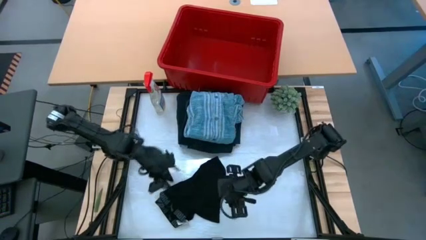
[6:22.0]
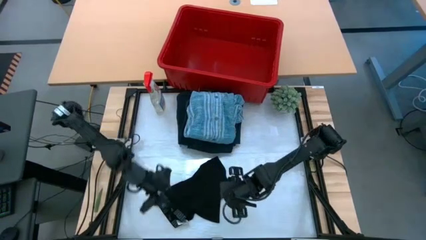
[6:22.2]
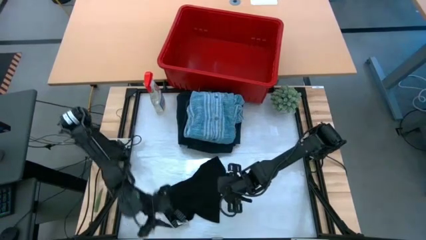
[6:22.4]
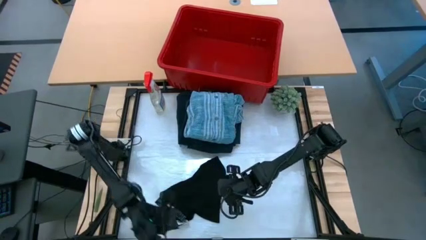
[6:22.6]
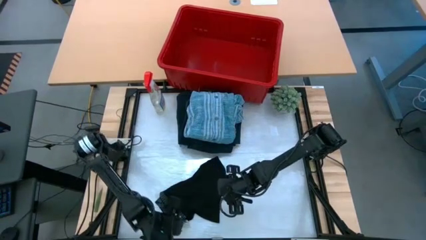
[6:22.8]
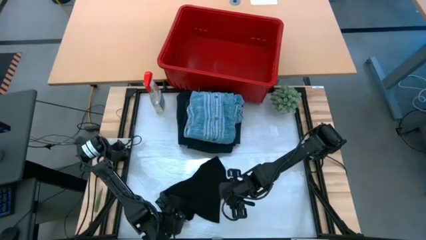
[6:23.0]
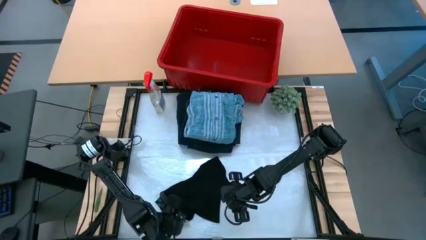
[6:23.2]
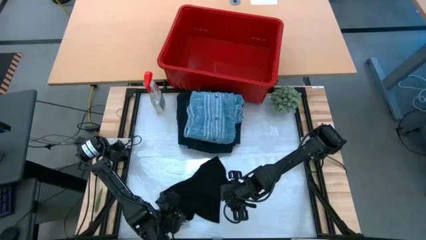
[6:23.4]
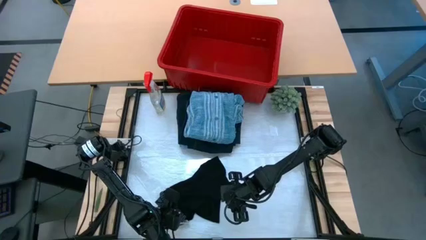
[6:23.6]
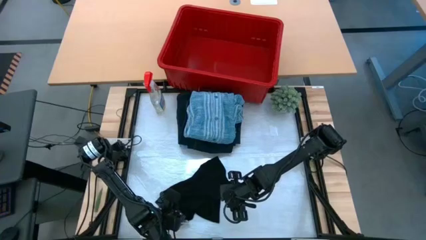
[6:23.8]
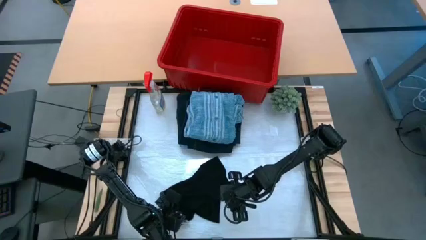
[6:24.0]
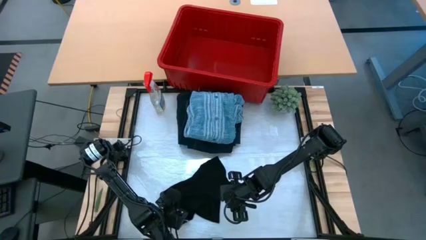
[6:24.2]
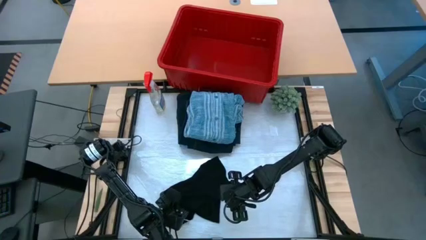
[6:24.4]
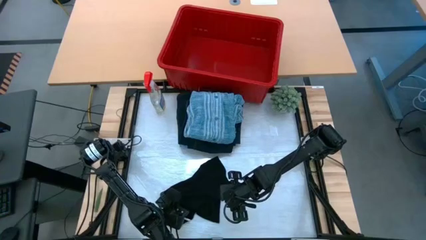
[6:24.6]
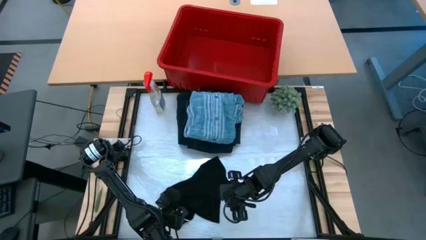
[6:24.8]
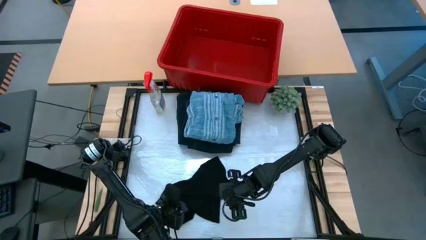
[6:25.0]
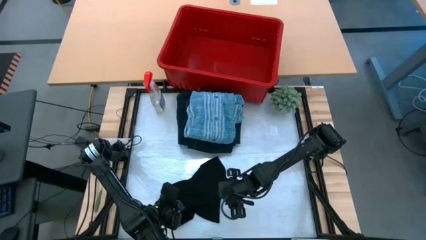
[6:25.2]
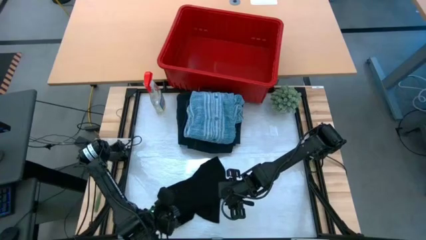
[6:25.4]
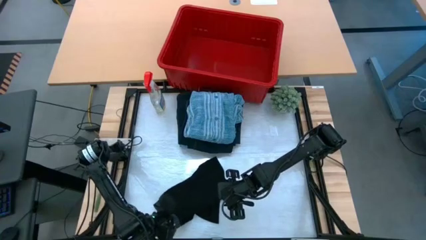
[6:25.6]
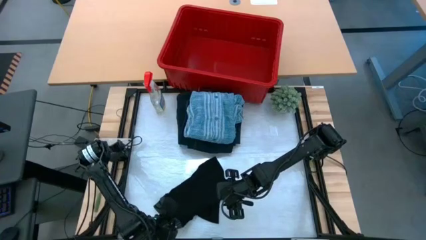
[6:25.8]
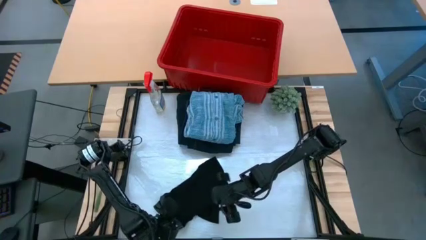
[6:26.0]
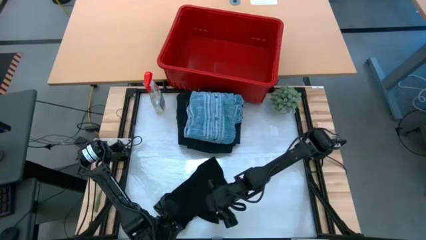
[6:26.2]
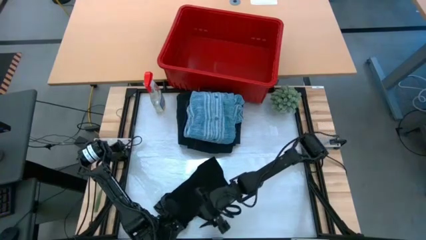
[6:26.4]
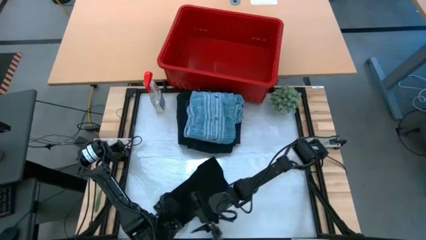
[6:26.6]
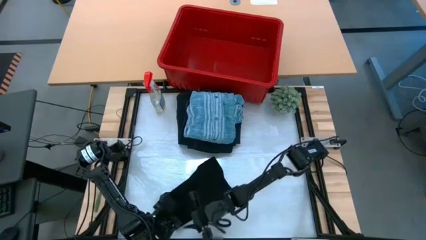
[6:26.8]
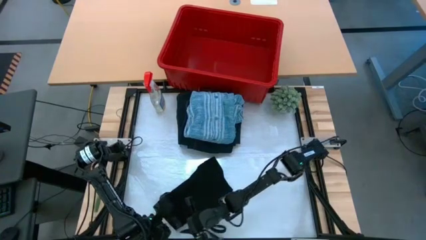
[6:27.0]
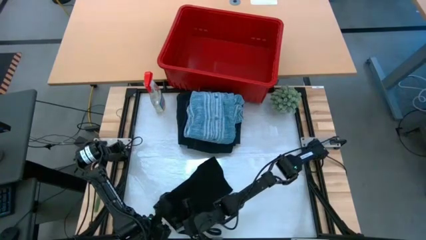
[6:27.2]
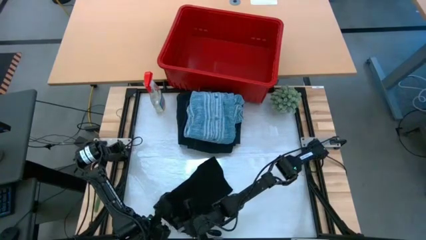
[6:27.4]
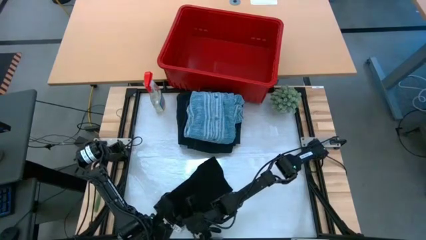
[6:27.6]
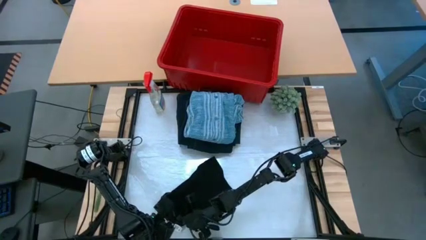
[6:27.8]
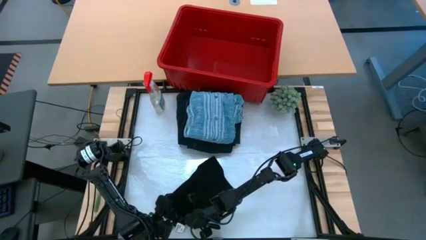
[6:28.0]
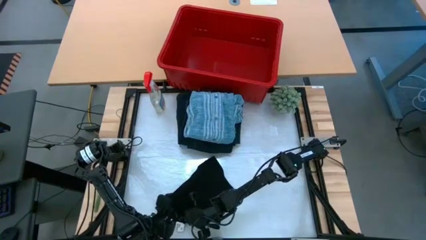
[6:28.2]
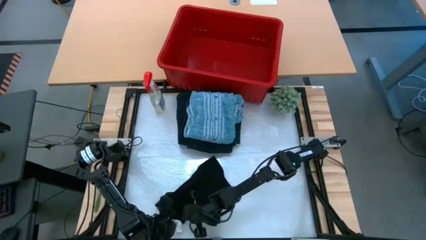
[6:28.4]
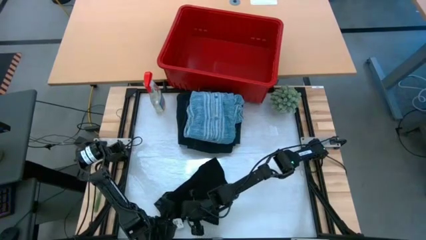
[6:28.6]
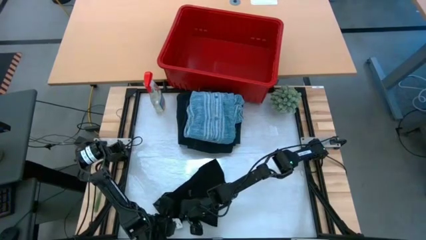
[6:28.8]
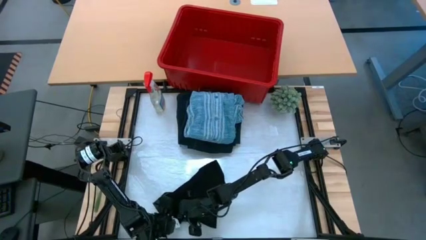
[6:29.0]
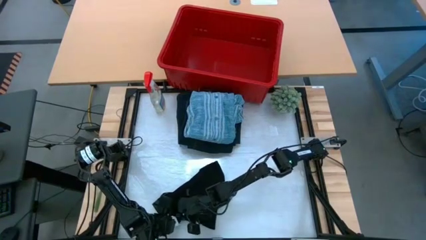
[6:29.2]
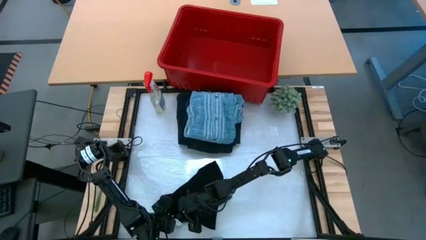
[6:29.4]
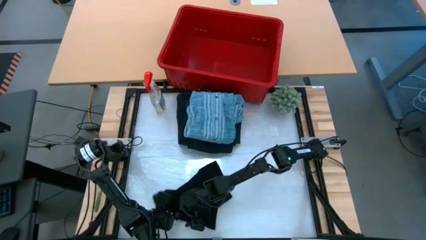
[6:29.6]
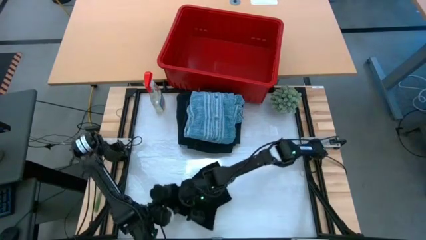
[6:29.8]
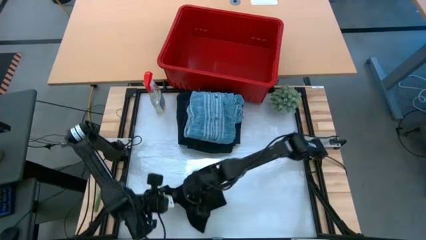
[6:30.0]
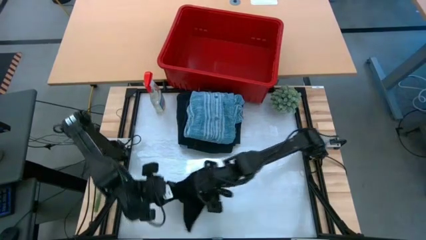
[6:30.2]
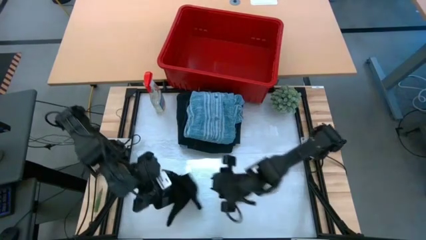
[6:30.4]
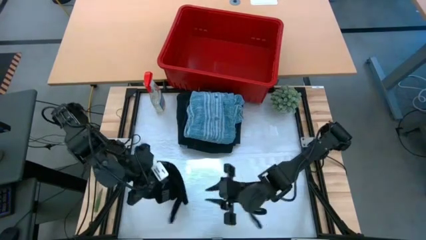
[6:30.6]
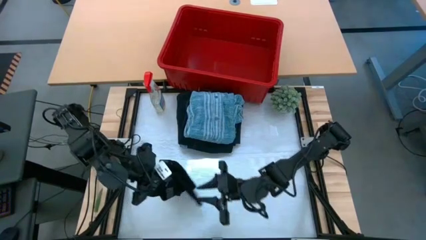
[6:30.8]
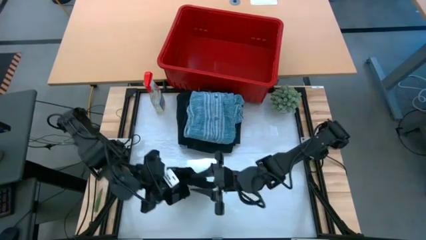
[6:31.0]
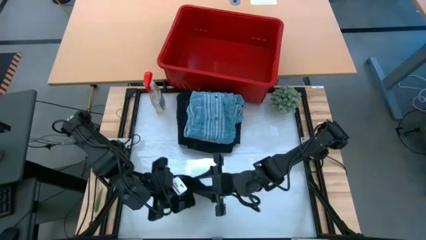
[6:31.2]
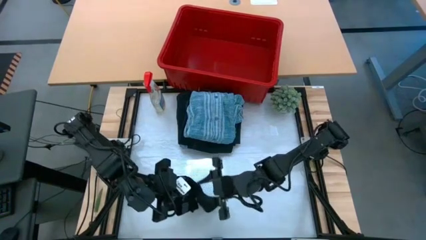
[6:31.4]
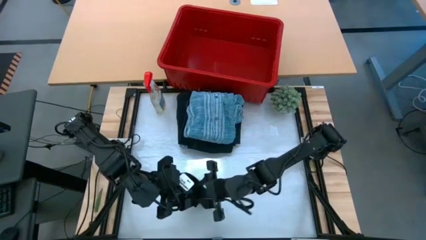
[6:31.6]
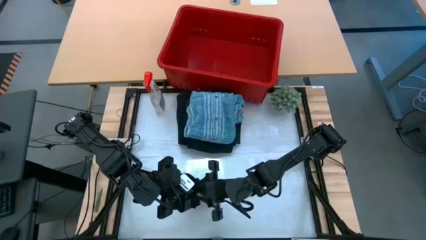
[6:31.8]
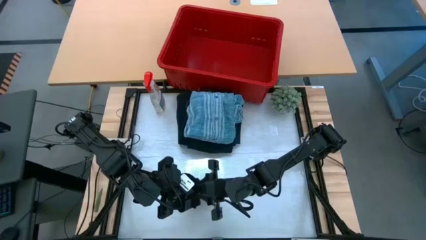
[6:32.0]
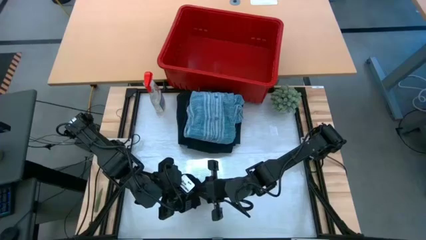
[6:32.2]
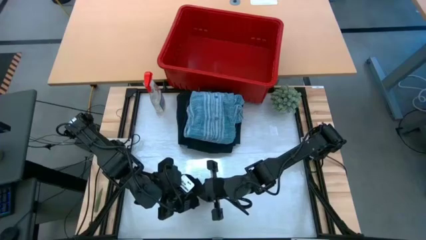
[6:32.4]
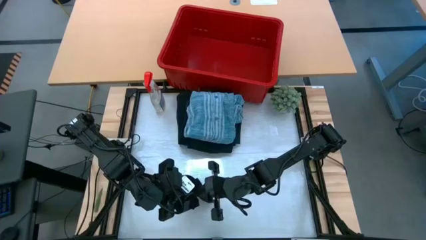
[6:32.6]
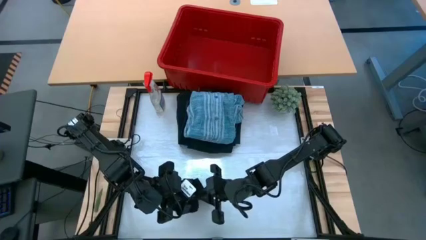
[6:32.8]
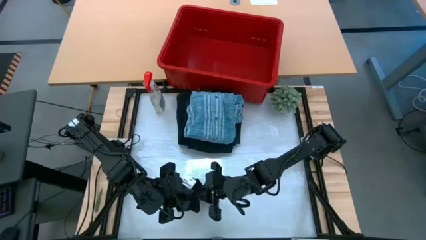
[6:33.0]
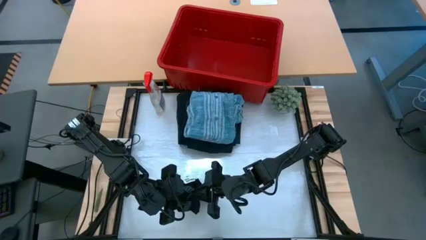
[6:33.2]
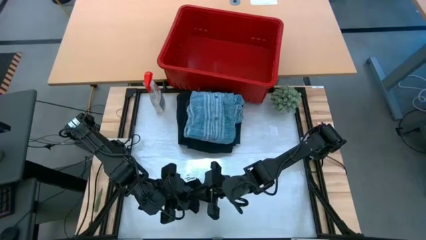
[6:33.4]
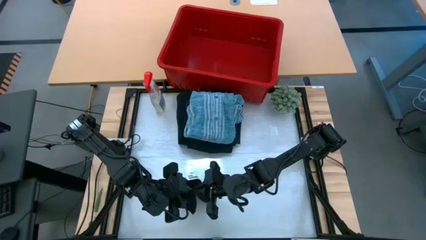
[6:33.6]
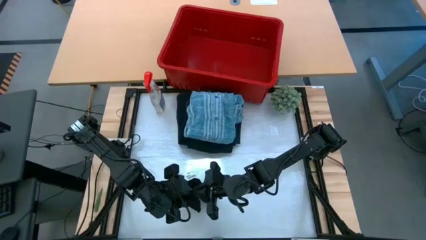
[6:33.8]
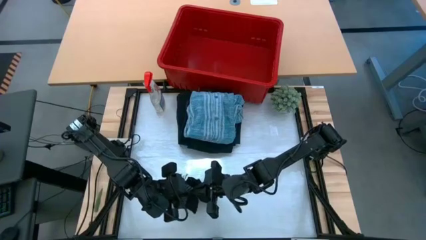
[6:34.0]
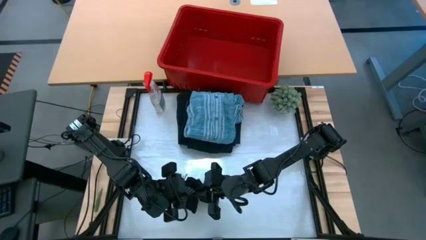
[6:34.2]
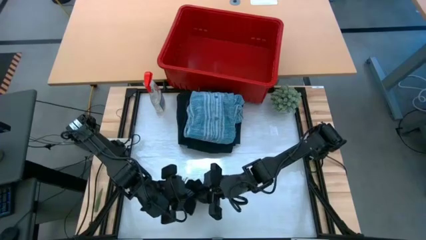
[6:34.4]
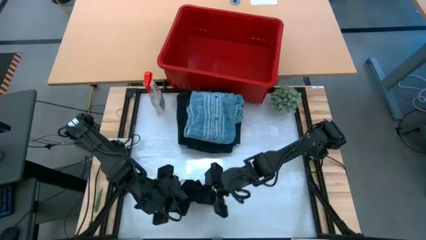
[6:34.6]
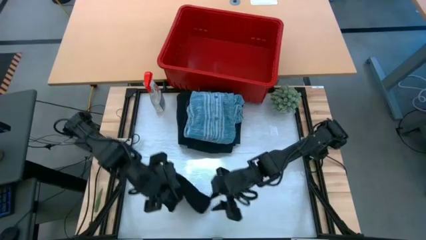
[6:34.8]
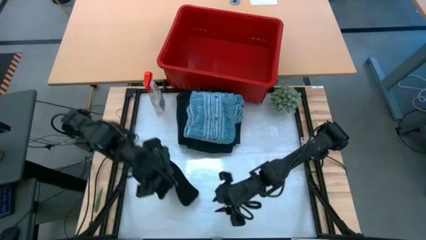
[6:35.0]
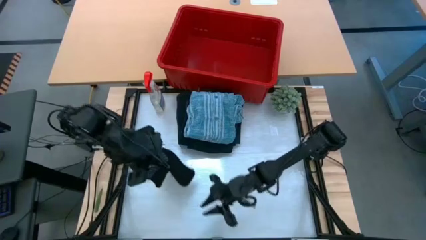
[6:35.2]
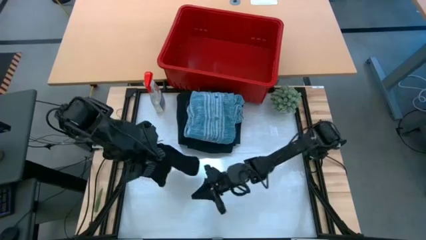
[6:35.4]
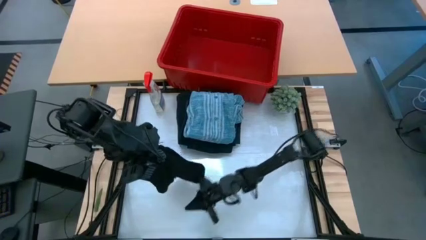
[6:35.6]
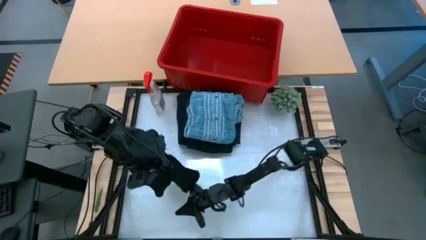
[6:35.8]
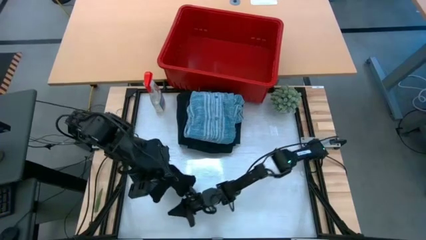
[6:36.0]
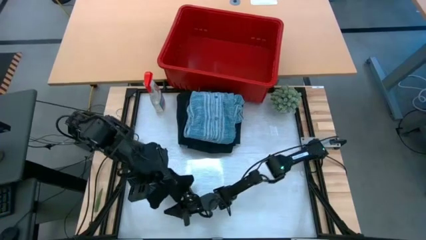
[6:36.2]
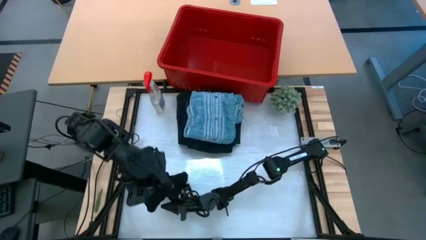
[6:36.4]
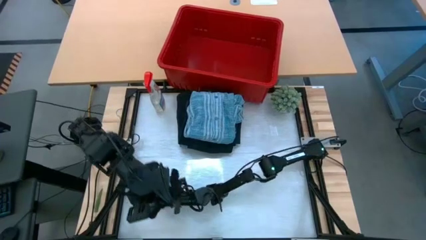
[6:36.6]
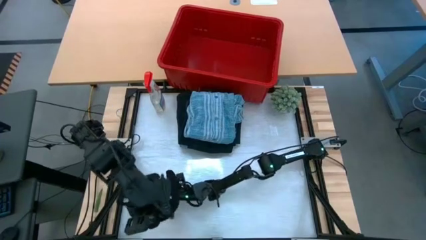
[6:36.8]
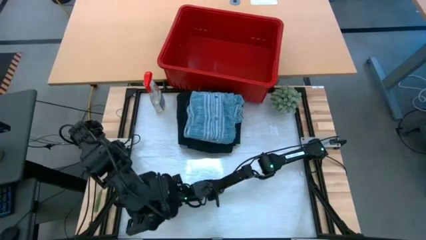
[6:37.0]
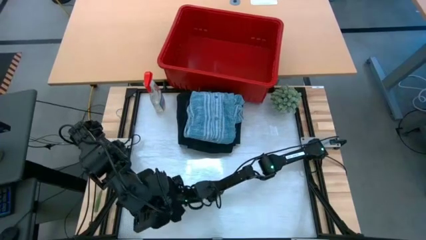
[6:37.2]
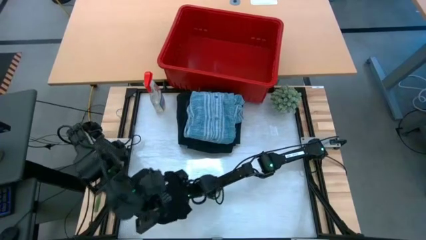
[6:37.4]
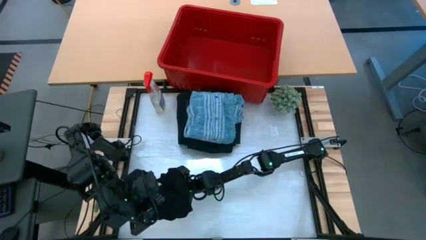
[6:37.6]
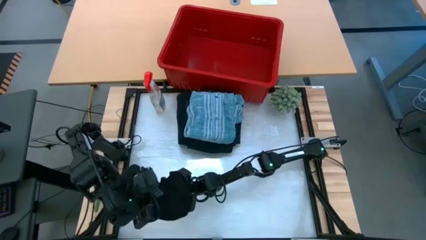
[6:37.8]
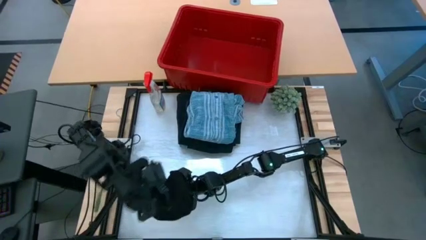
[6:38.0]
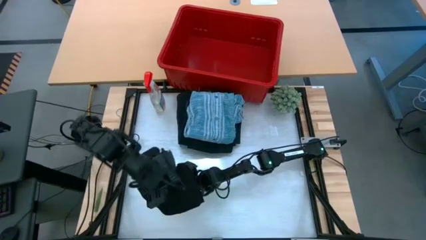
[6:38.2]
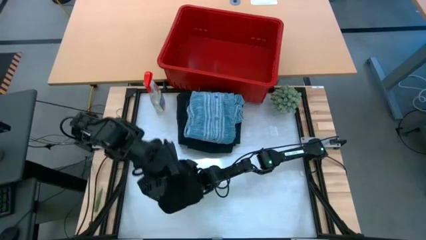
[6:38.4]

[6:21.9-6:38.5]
Task: Fold Laundry from Bin
Fold the black underwear from the red laundry
